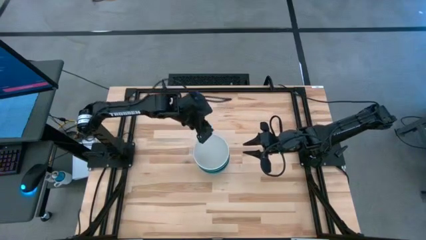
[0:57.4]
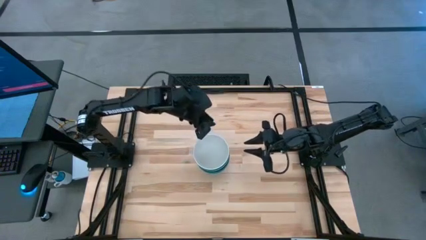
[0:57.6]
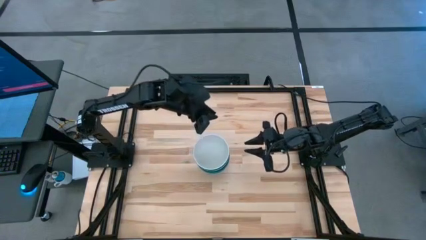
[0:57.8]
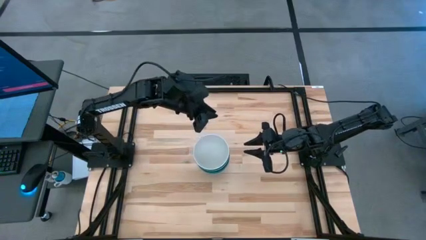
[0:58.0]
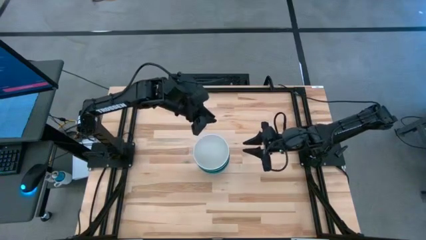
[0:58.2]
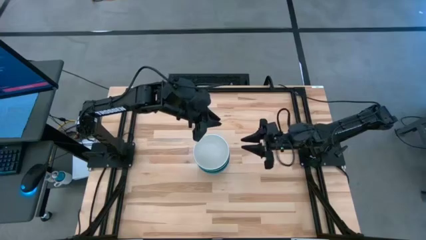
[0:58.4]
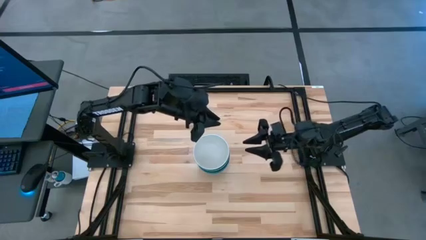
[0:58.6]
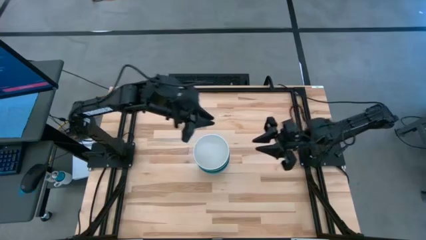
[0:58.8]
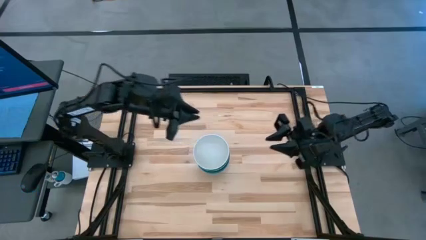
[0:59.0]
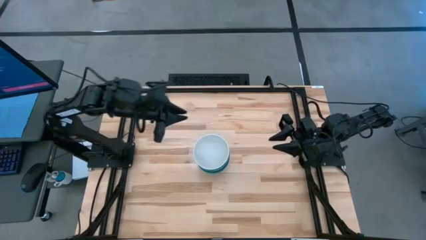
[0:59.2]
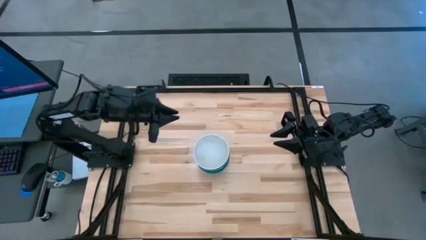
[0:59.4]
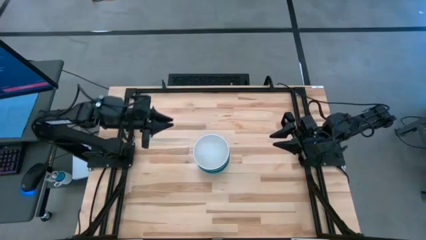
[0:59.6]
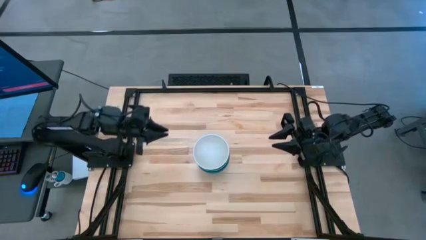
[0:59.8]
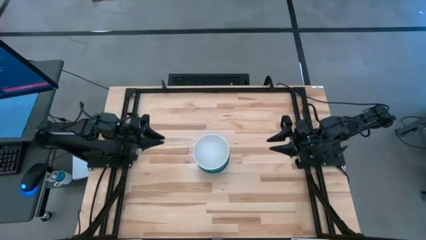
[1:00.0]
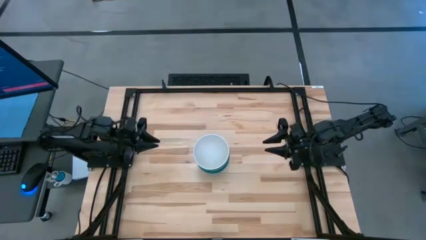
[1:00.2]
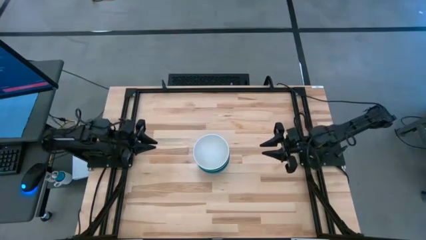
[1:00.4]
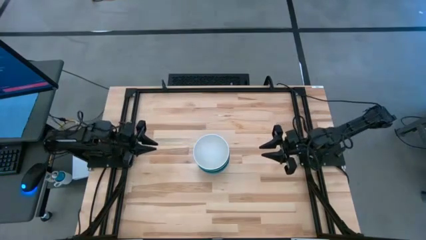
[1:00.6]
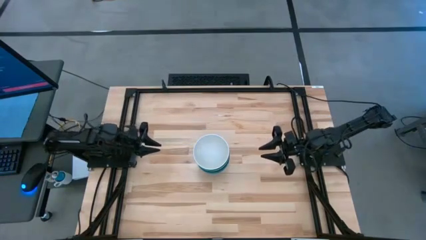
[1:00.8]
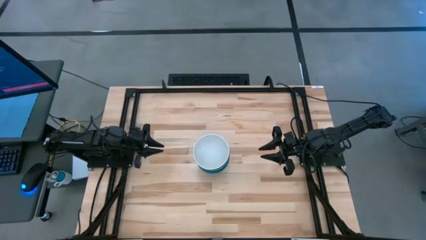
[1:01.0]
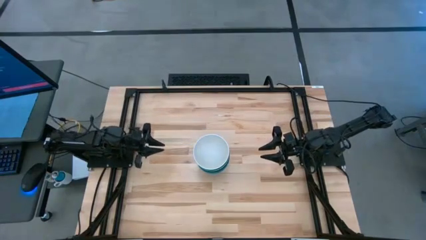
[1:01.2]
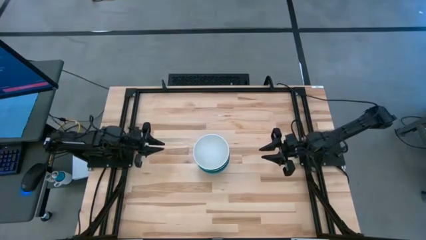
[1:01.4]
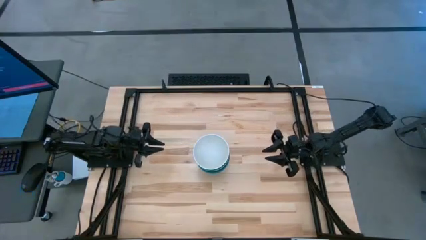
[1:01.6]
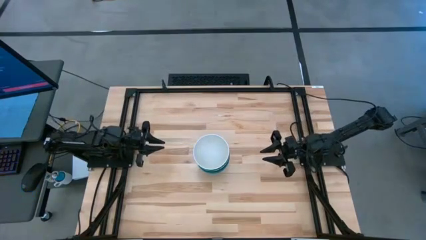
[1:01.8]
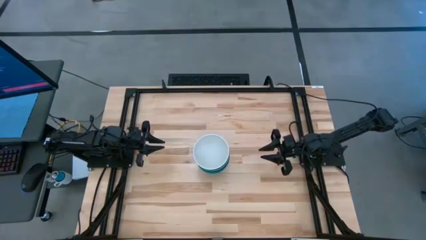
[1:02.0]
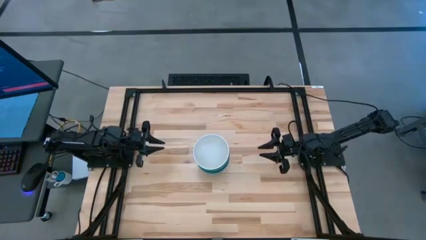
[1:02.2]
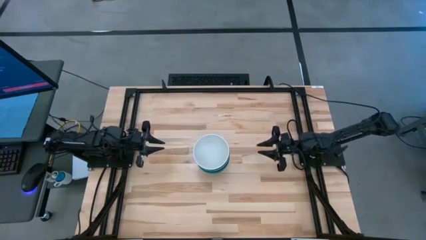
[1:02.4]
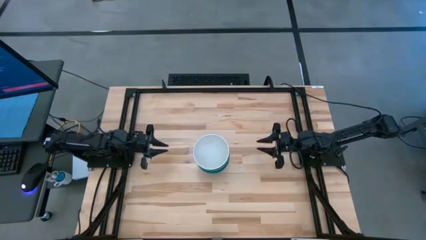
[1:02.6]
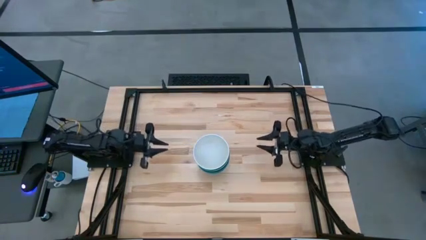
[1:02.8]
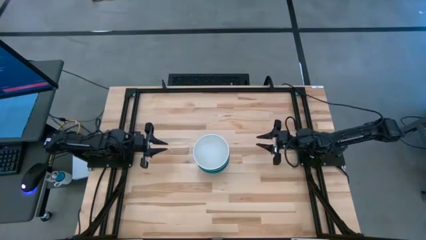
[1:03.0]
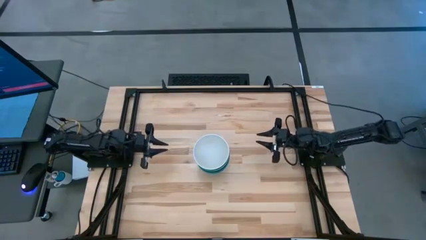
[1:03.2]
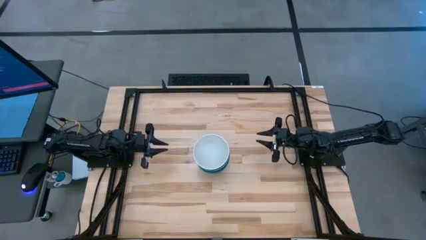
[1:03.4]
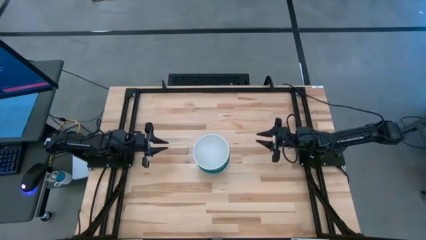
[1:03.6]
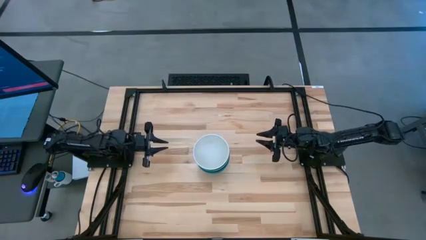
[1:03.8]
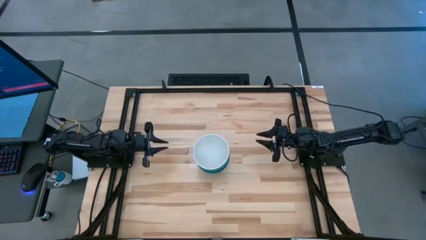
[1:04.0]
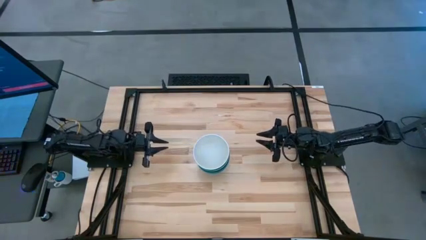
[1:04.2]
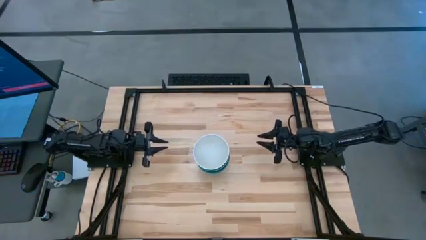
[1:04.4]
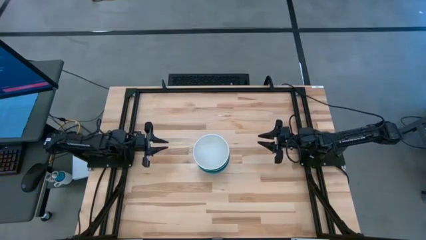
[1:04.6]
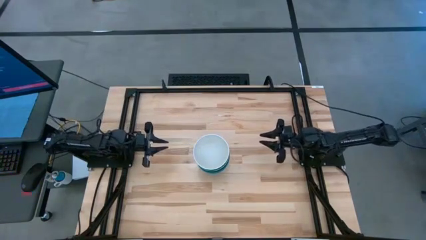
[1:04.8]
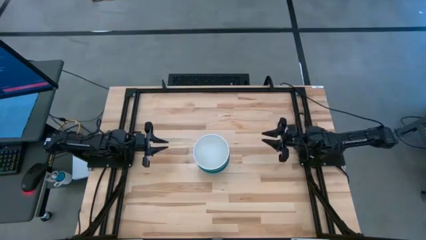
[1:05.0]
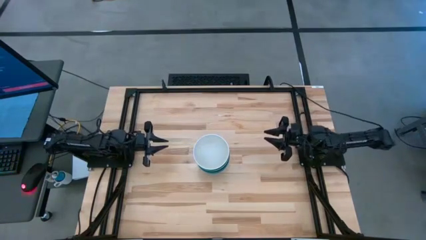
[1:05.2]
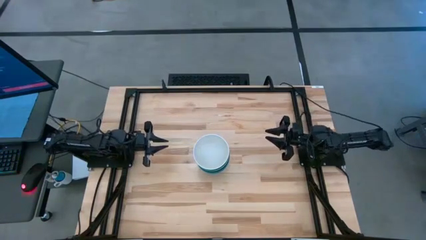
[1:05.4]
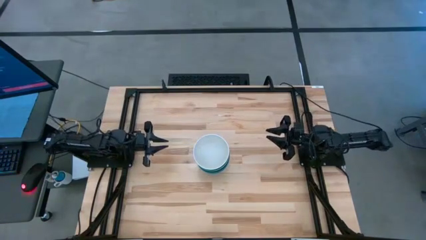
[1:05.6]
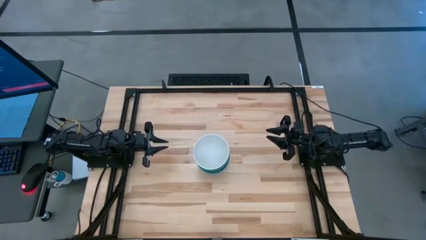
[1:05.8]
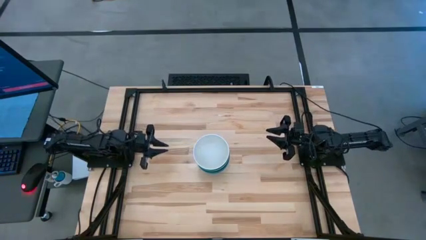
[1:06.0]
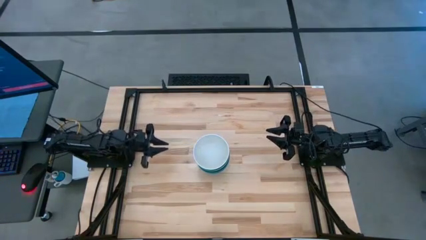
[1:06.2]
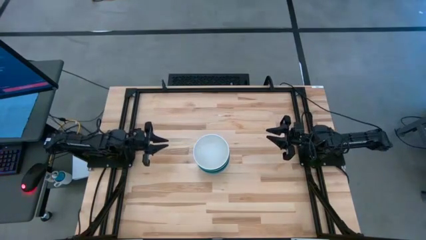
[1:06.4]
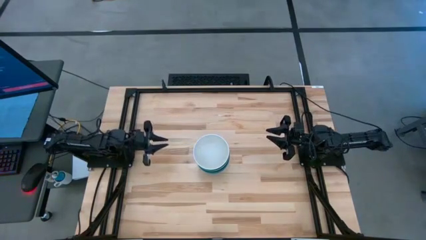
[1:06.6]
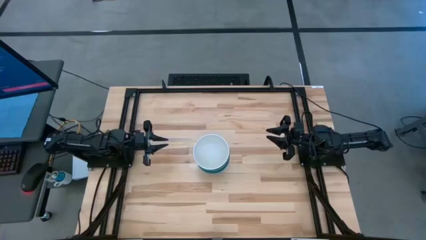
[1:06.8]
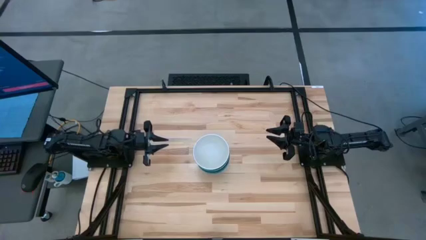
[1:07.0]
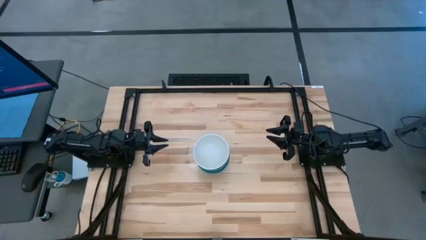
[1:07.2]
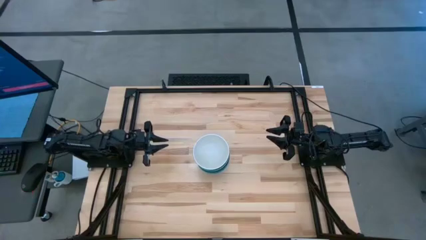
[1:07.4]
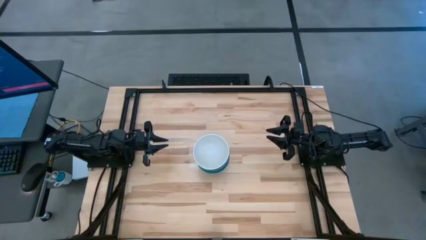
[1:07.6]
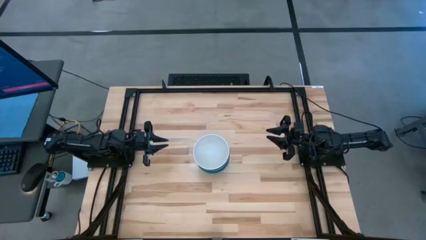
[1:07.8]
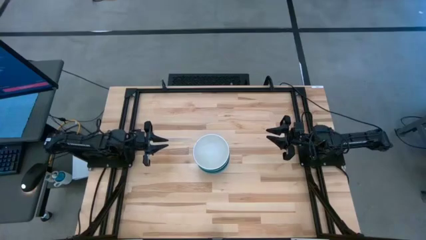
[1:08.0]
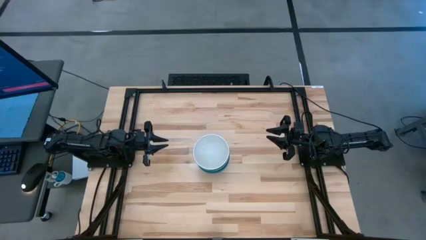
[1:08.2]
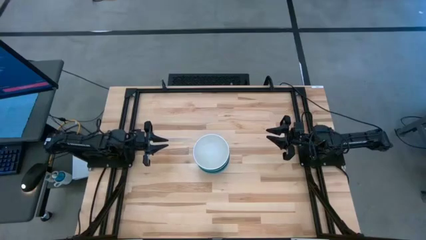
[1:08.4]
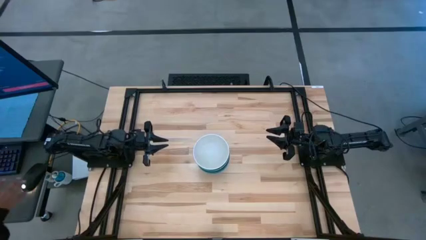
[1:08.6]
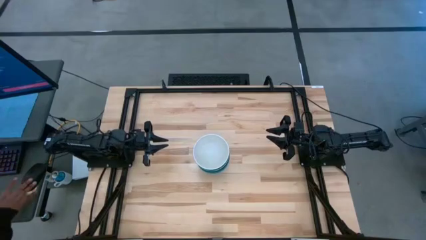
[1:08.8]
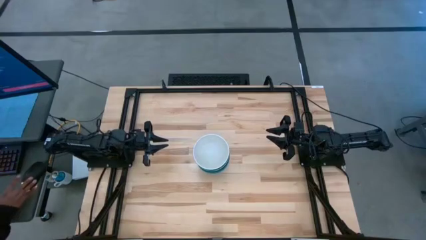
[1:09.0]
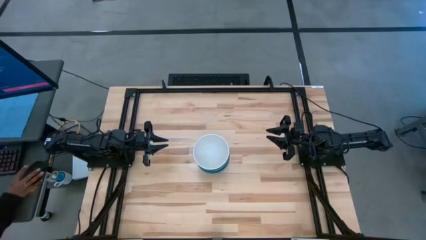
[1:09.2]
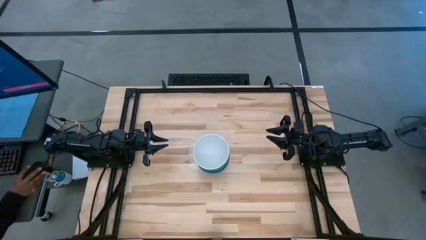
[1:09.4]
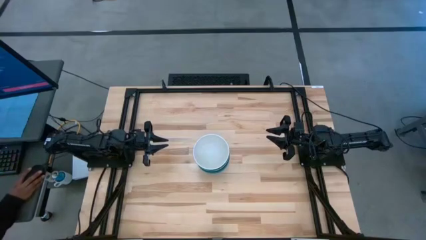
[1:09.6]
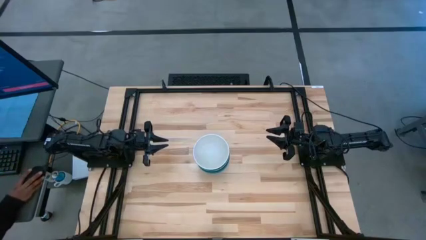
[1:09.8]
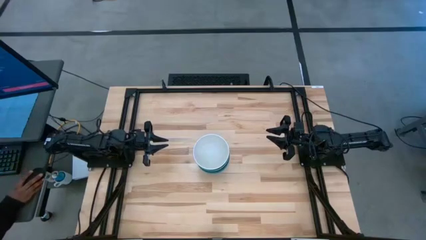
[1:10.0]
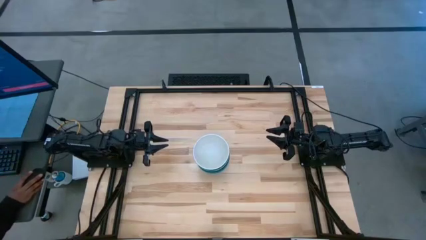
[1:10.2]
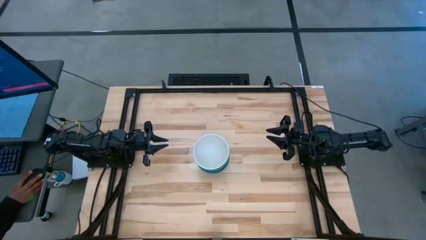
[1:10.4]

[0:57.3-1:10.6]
Task: Nest bowls inside each other
Return to Home Position

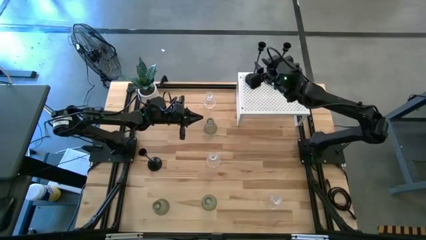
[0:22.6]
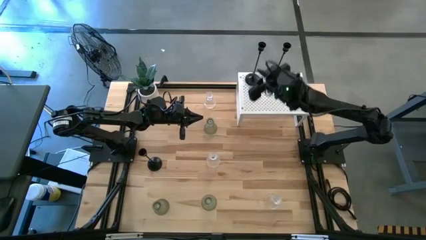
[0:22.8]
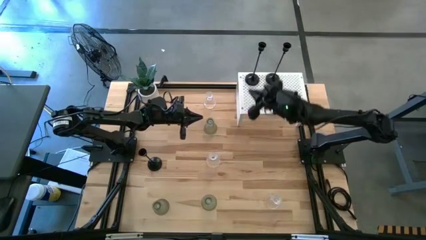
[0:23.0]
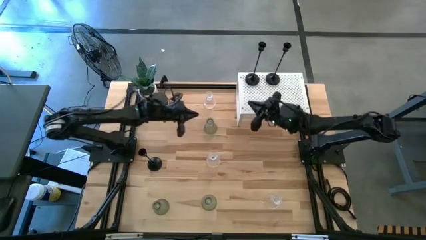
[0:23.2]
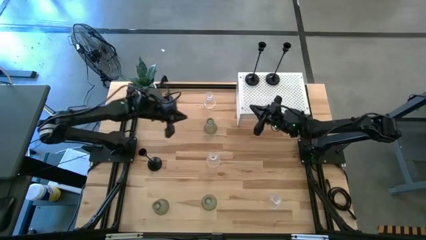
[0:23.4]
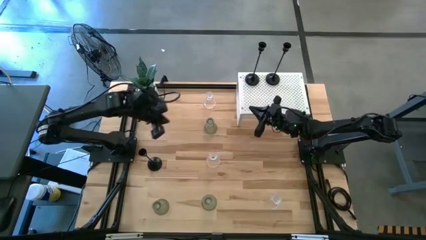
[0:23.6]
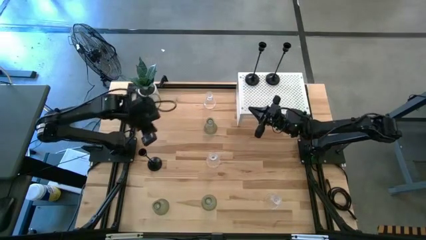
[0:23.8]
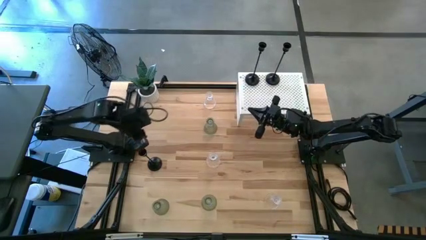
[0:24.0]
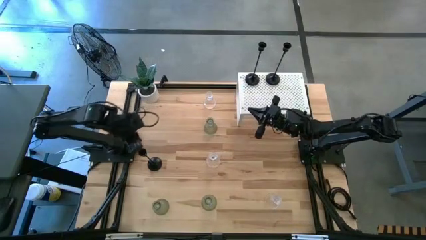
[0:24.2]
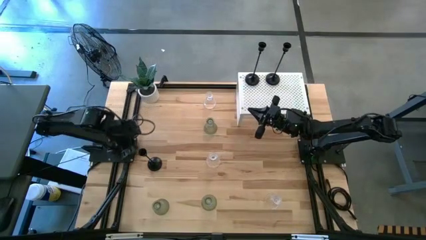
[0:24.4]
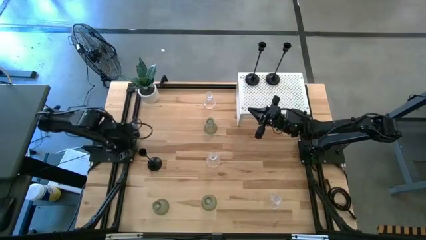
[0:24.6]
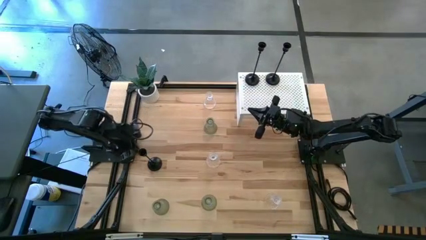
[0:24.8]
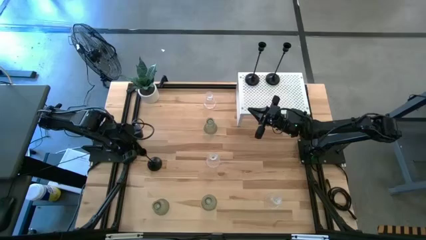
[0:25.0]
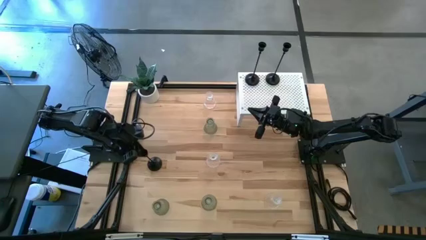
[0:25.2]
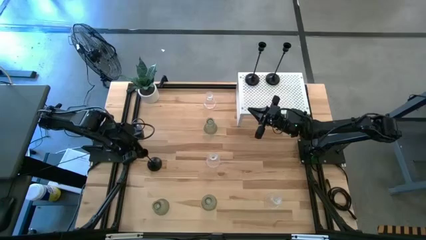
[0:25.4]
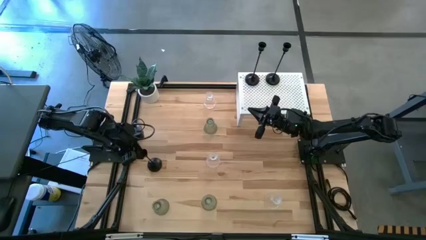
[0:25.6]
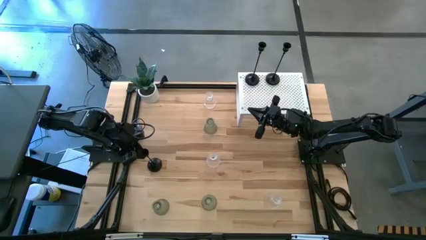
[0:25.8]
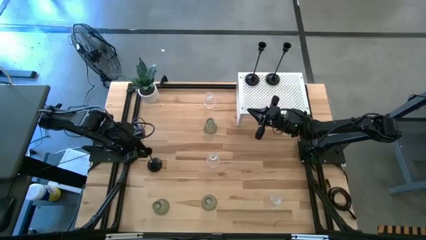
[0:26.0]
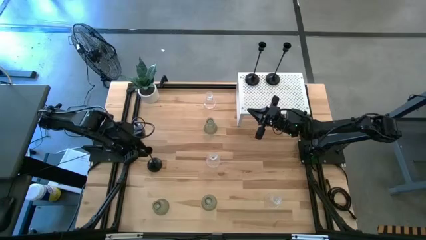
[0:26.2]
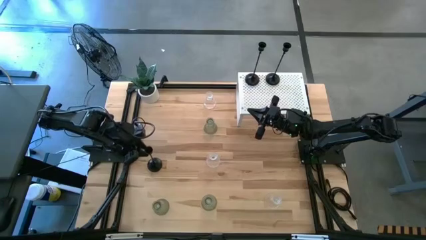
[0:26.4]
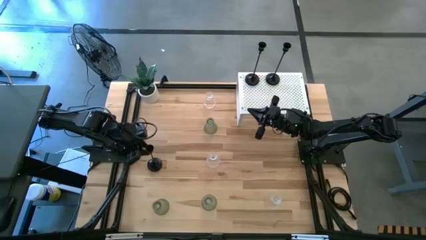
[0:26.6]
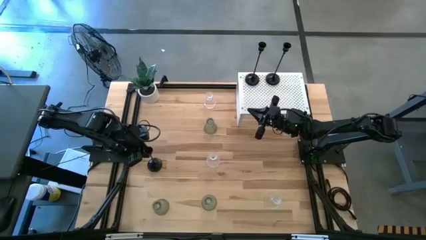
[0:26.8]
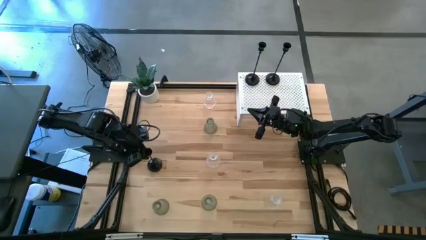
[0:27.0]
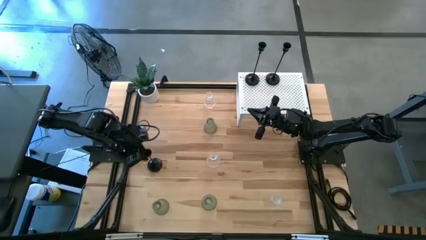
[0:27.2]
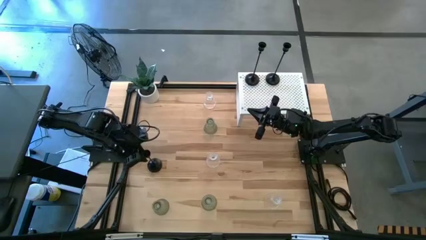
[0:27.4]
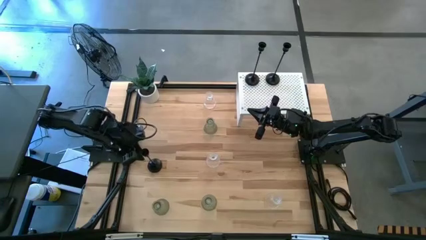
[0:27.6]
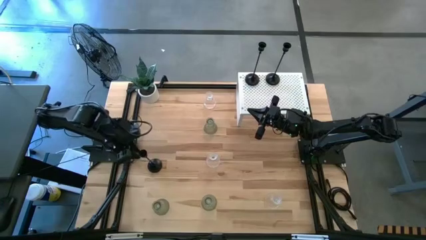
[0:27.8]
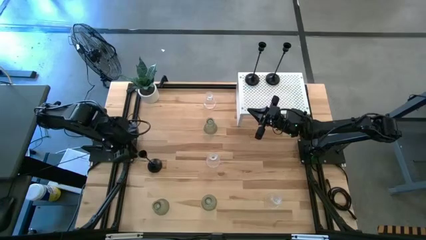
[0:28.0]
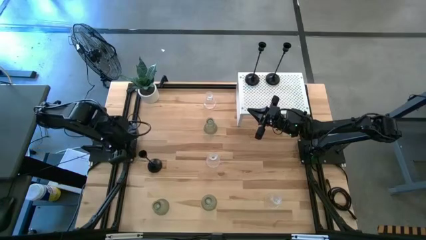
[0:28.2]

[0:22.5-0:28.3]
Task: Pick & Place candle stick holders
Put the black candle holder on the shelf aligned with the other black candle holder
